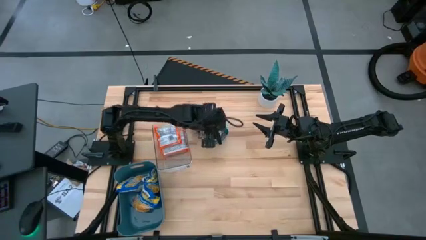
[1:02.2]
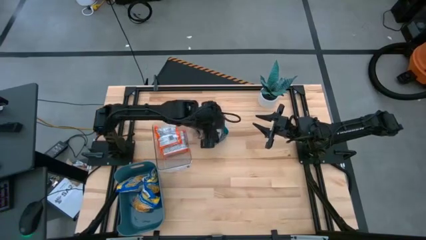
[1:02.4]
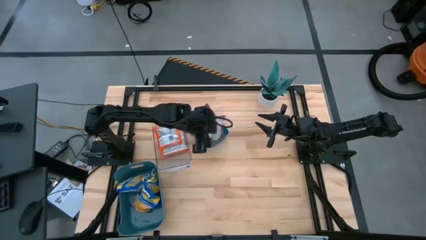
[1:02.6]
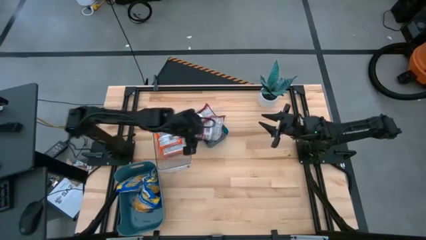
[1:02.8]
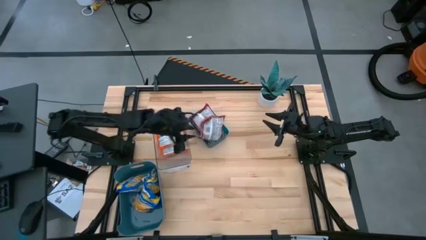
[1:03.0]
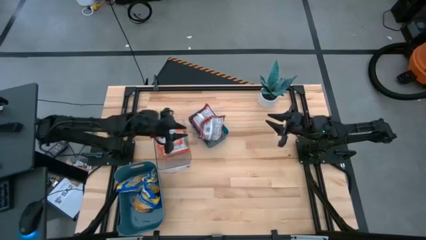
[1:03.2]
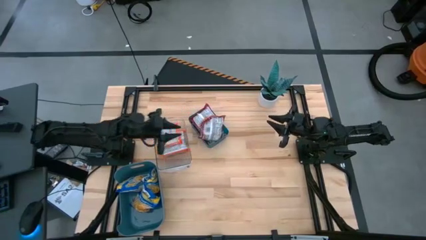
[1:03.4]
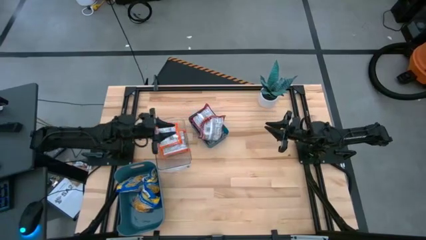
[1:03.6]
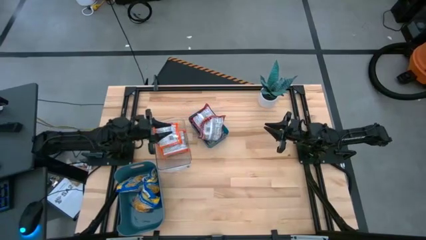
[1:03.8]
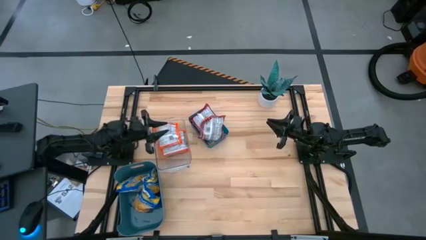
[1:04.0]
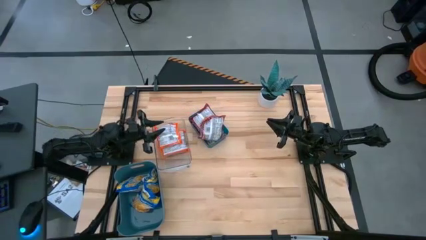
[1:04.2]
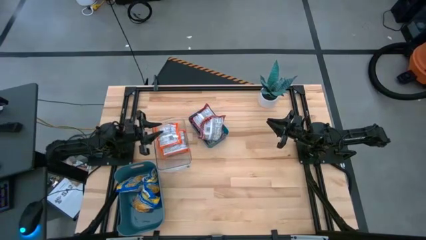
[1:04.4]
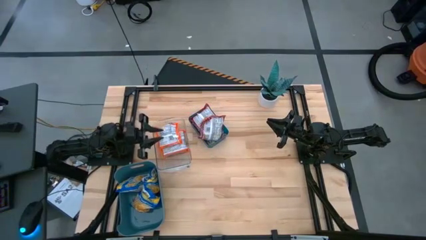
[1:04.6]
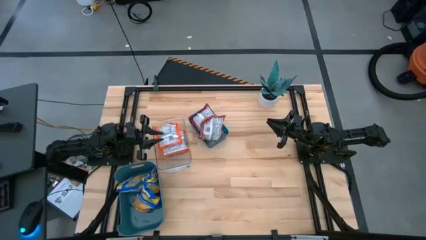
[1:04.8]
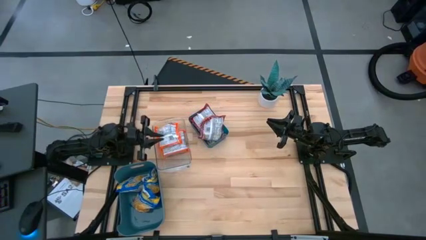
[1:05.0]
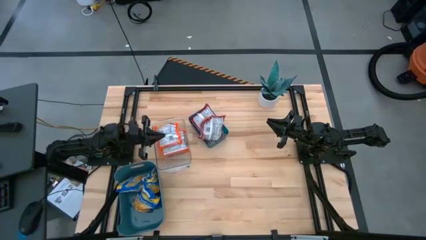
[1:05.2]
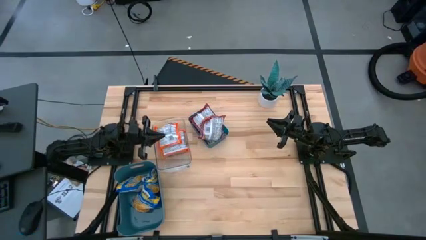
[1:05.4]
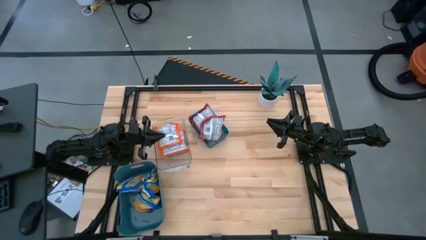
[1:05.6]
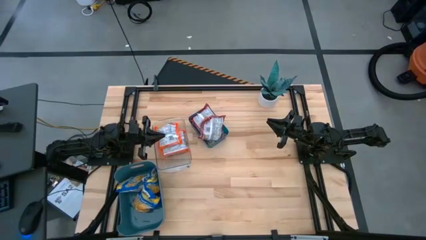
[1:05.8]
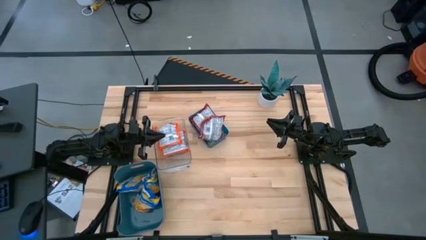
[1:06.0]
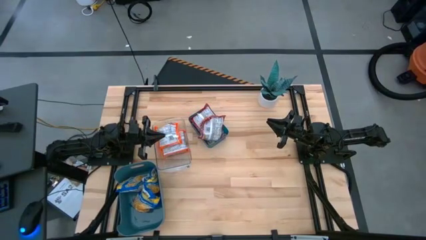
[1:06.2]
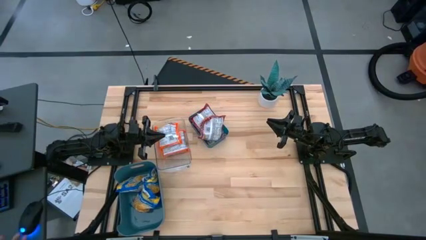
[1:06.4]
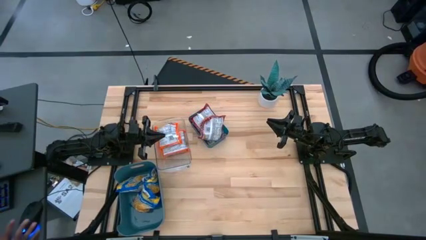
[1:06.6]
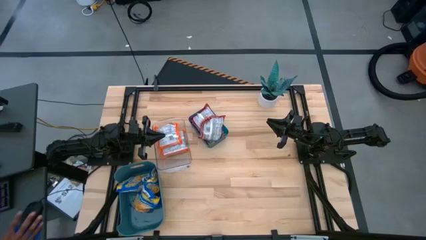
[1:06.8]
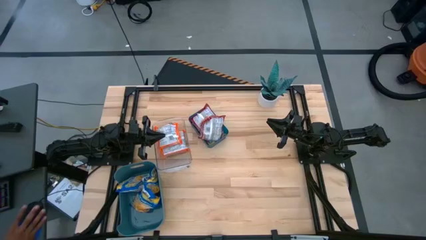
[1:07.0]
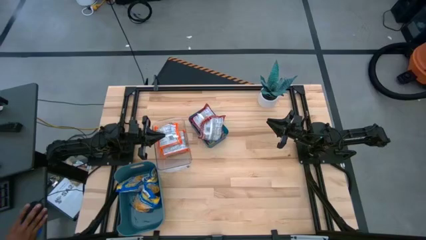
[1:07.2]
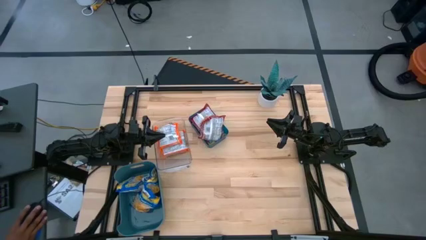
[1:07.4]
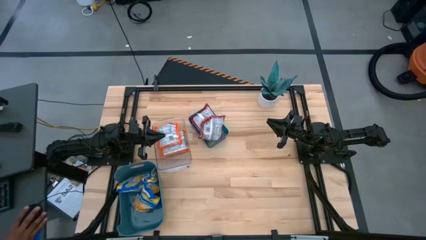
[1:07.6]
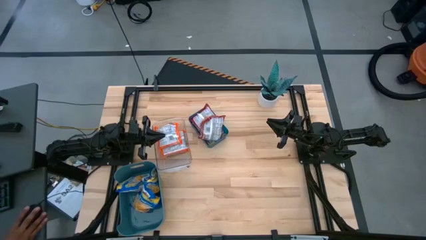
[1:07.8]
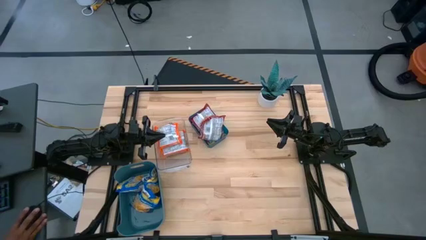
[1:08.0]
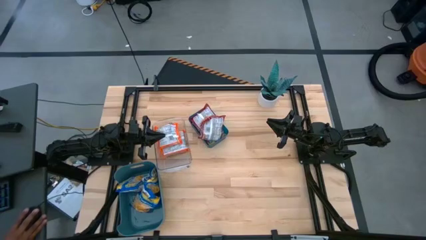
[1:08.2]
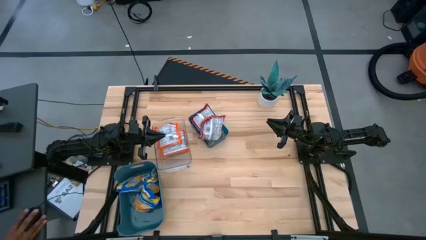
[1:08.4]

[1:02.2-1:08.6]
Task: Sort Maruchan noodles
Return to Home Position

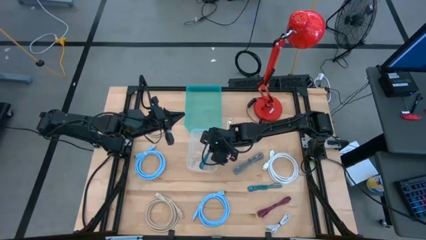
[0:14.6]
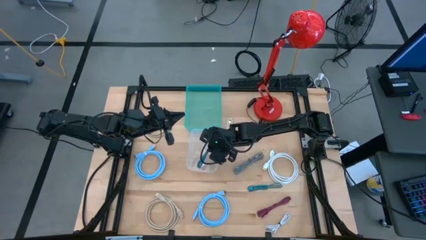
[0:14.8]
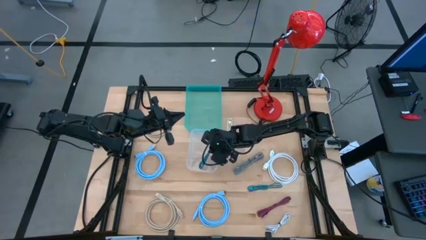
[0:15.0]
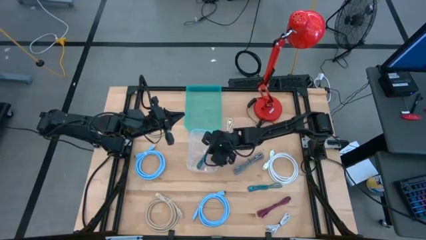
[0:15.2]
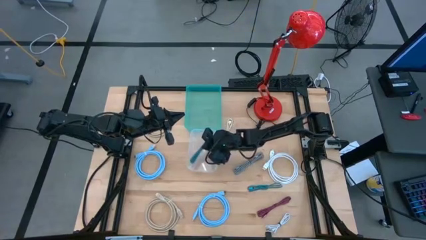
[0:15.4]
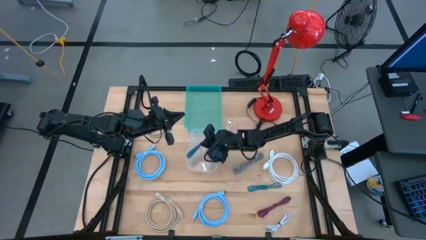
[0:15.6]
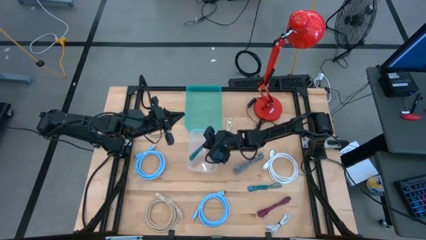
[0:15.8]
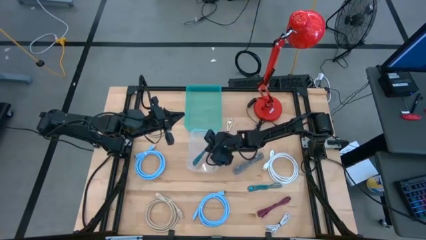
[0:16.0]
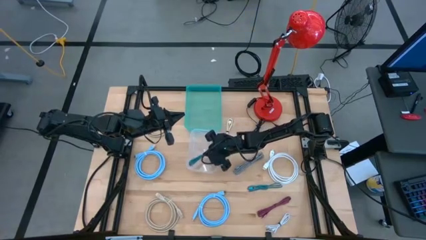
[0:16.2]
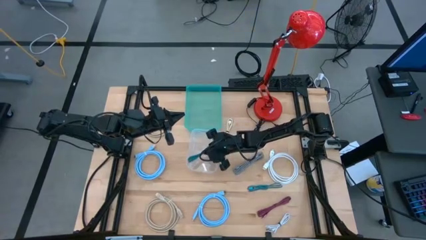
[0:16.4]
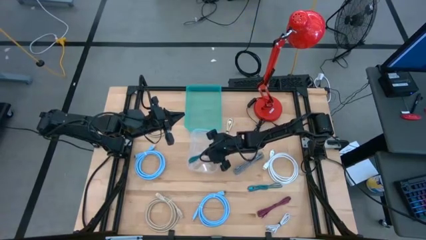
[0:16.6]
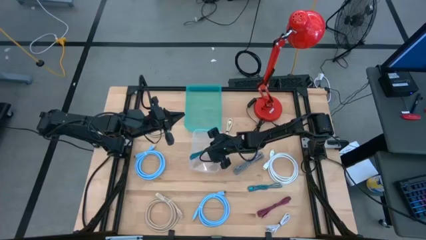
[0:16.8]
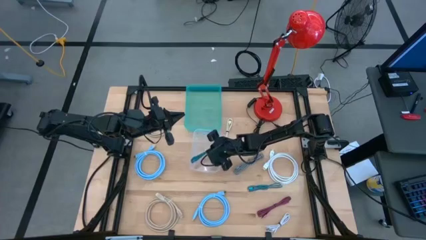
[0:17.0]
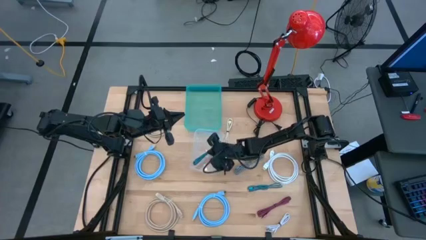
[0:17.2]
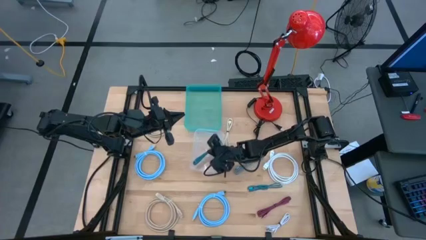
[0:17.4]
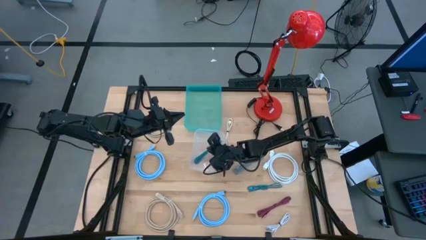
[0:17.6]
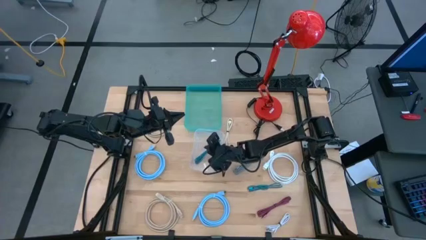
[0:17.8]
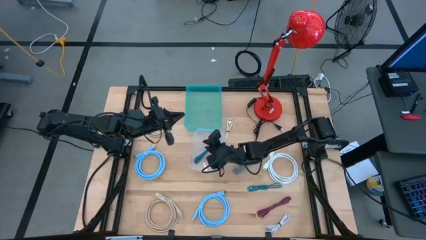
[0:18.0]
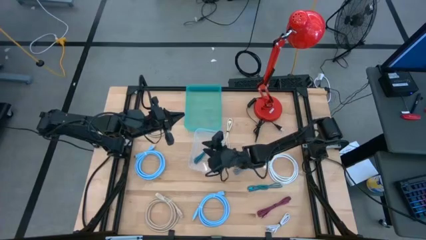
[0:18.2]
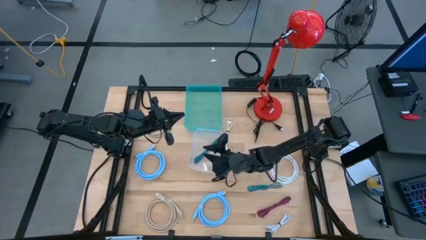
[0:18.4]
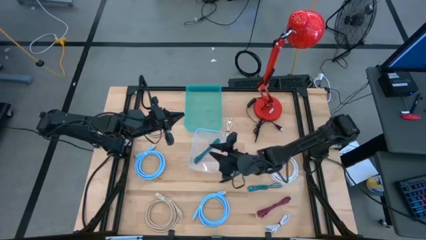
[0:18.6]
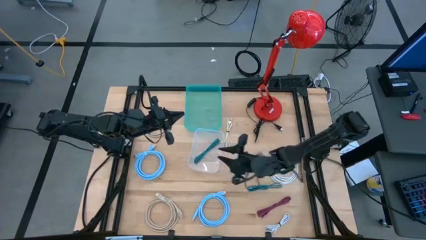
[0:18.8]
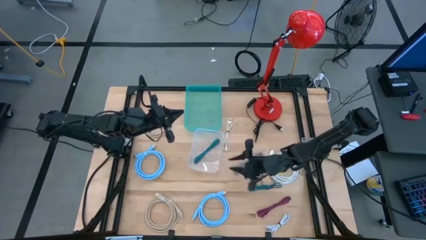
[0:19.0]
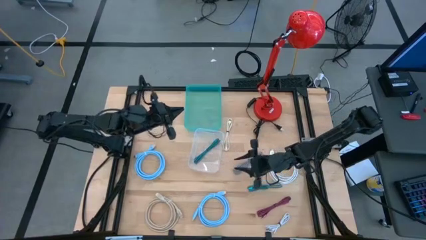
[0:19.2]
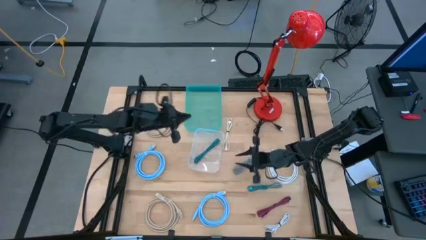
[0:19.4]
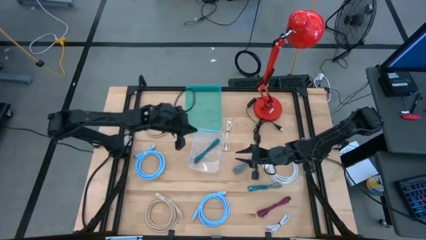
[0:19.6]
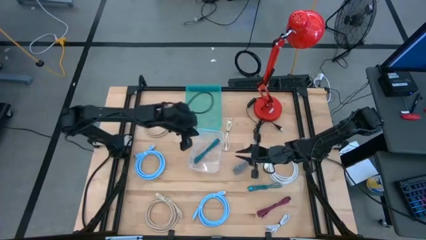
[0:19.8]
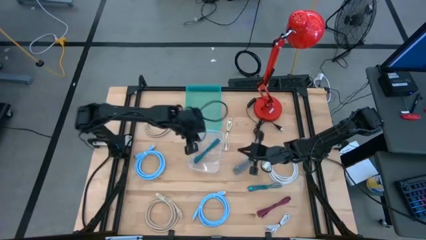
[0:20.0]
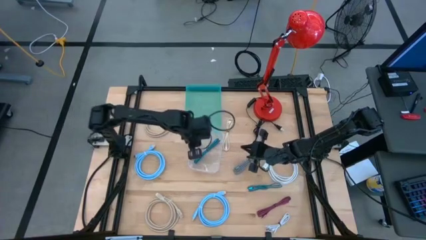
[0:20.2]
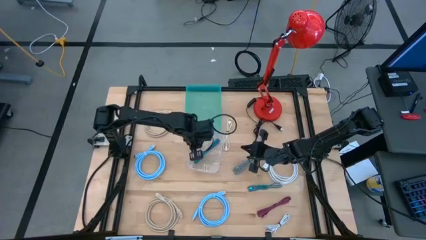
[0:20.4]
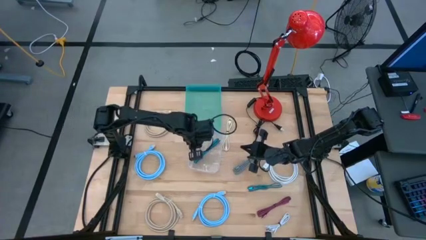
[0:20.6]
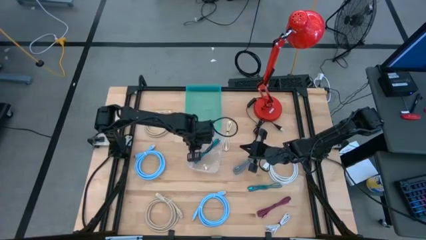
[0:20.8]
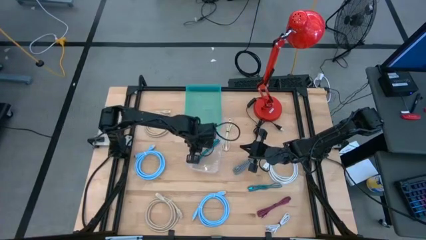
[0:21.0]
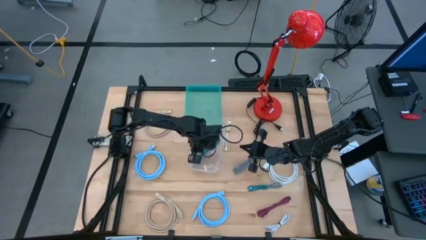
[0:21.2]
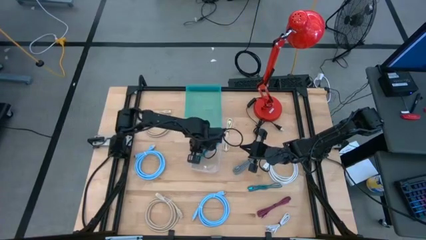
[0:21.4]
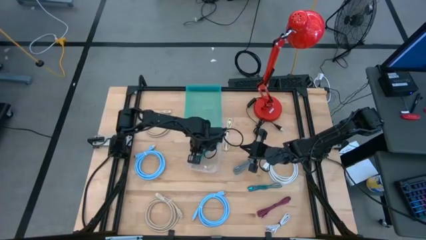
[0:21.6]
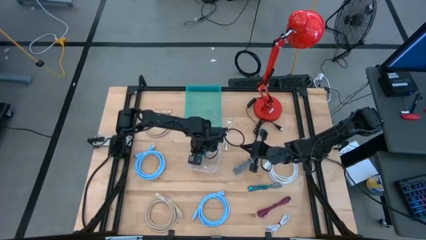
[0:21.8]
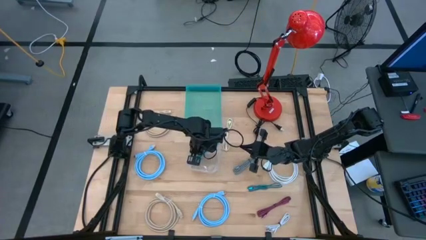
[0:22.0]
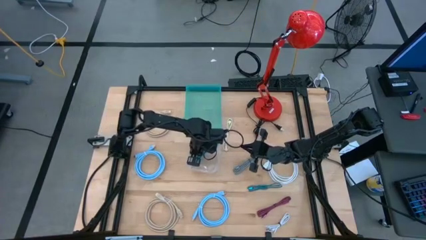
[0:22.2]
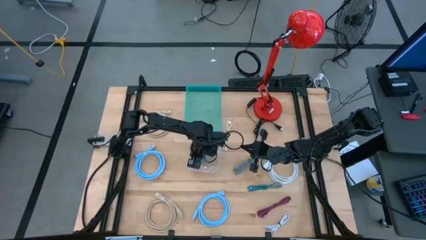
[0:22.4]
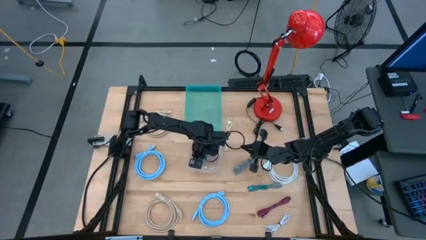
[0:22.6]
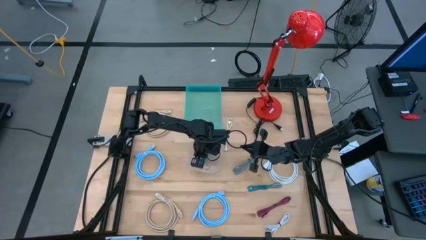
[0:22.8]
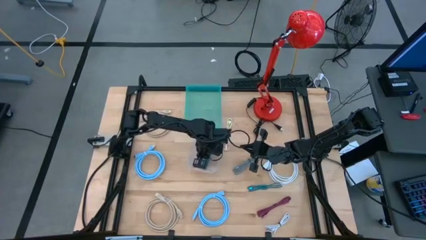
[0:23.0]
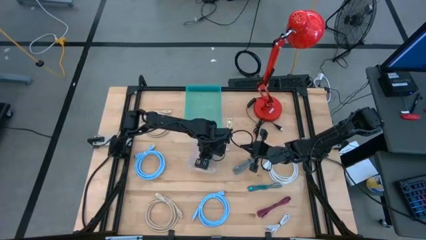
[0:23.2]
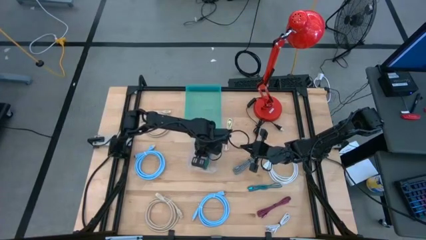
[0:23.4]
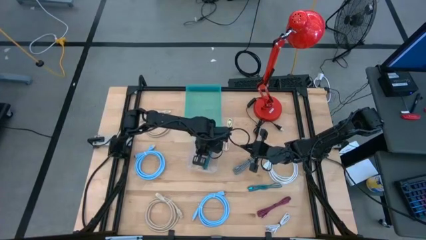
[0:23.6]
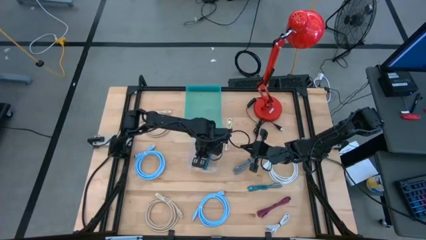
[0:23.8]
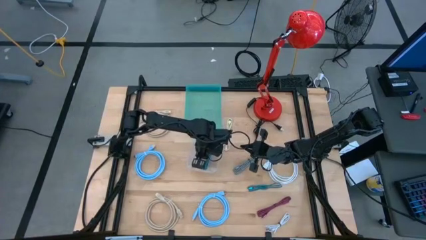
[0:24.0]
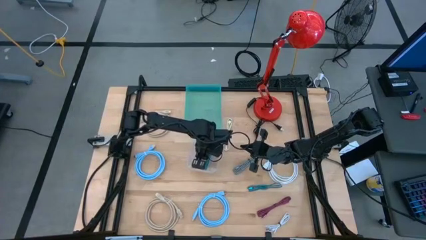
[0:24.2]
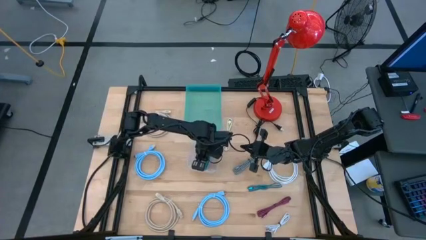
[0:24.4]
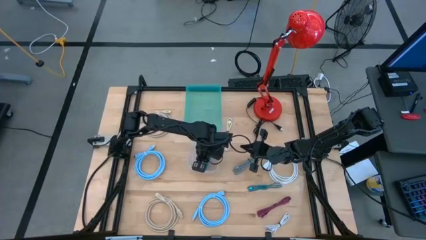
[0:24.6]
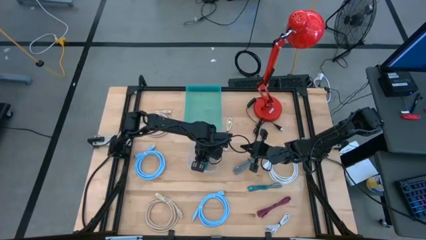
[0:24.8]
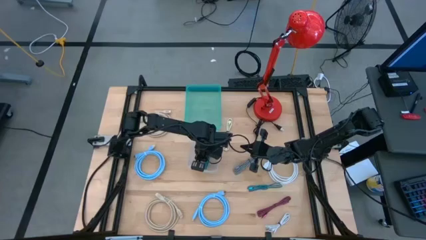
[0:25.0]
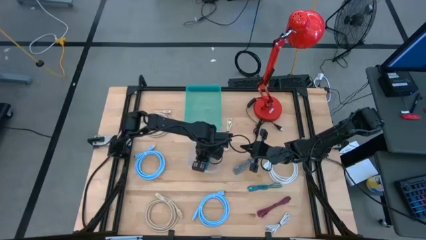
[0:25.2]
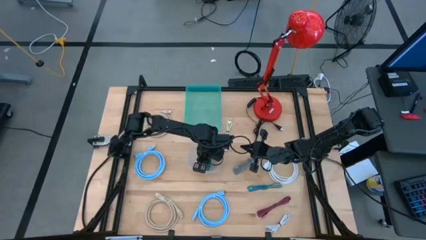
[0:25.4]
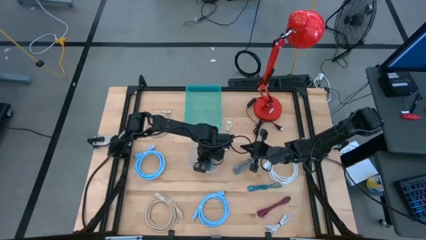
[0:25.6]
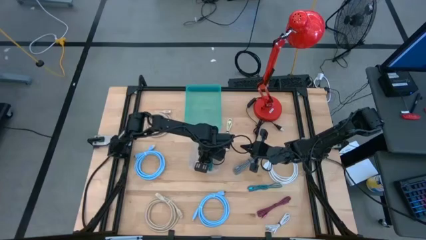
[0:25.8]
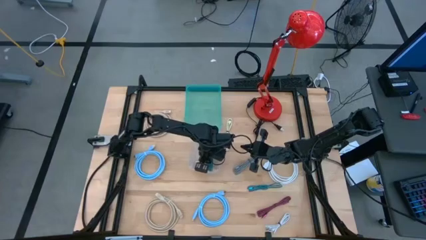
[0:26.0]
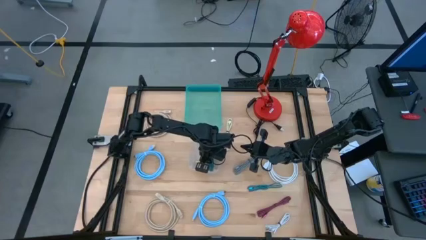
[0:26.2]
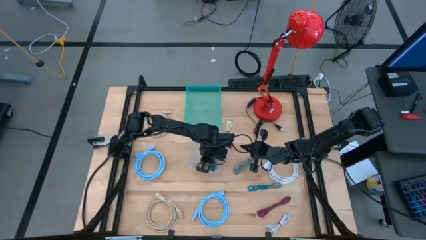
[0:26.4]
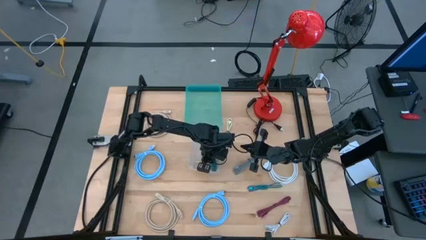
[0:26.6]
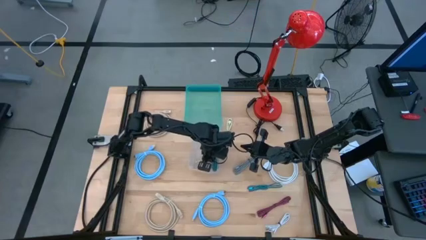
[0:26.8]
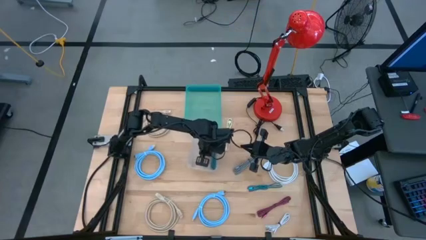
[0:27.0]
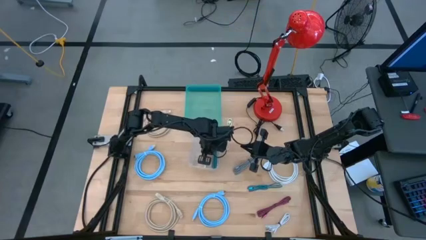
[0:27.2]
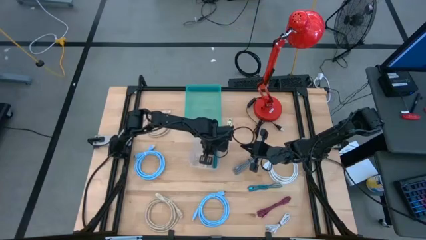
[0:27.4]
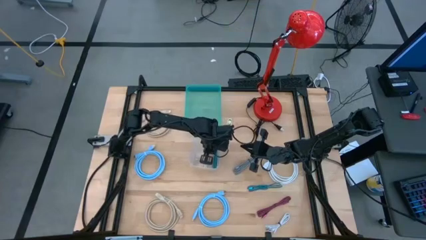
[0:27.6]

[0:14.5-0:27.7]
Task: Pick & Place USB Port
Put the top blue black tied USB cable into the transparent bin
